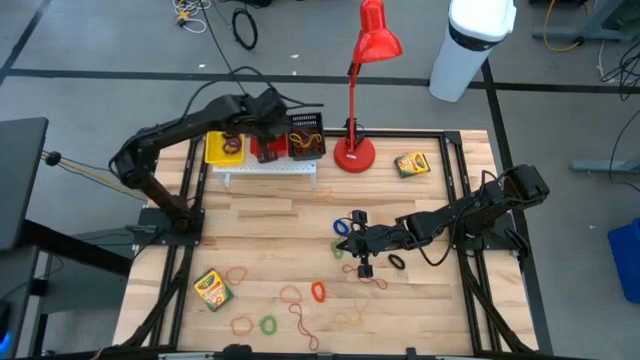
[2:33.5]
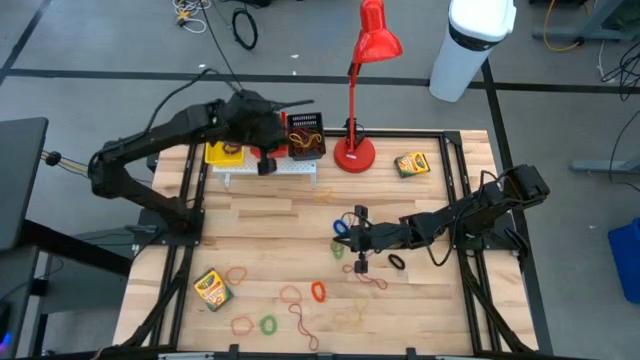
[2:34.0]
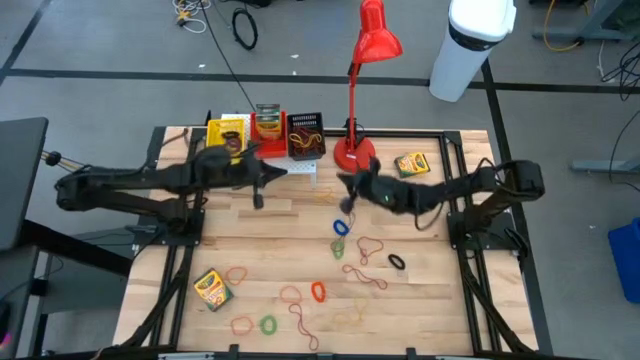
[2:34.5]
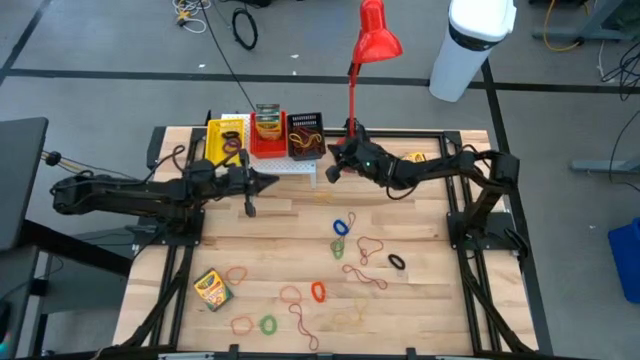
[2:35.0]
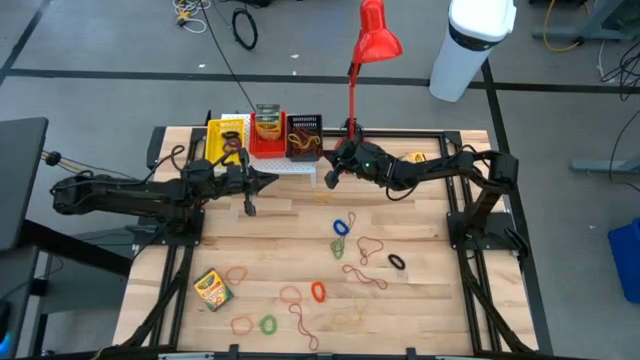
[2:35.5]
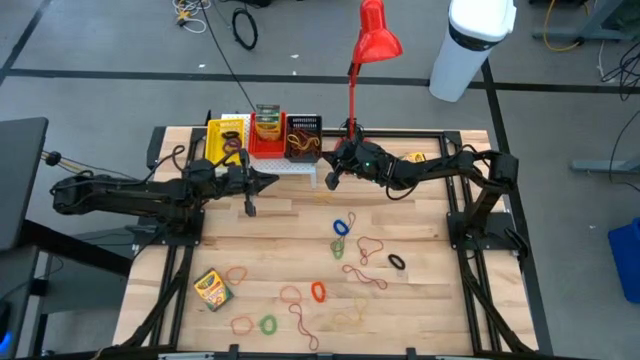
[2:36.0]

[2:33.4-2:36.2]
Task: Pick & Place Office Desk Supplies
Adjust the black bin on the shelf

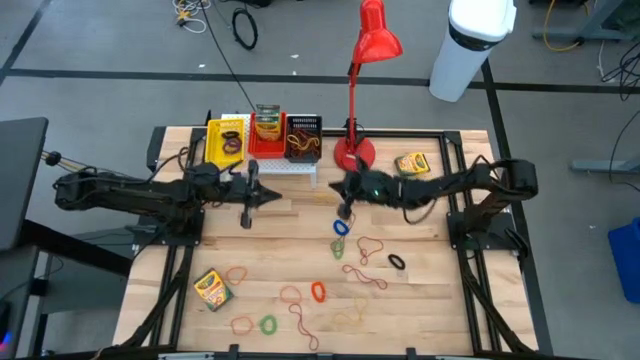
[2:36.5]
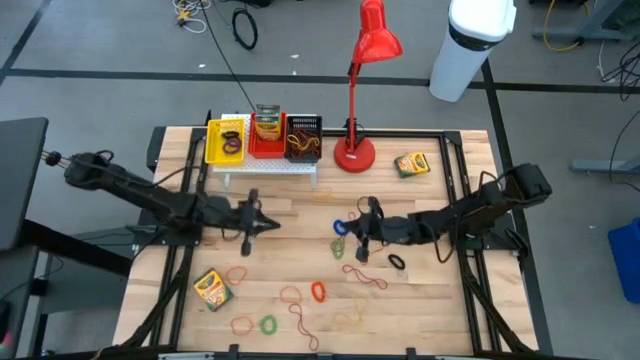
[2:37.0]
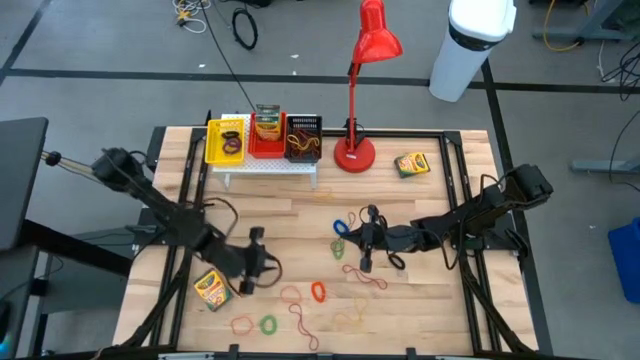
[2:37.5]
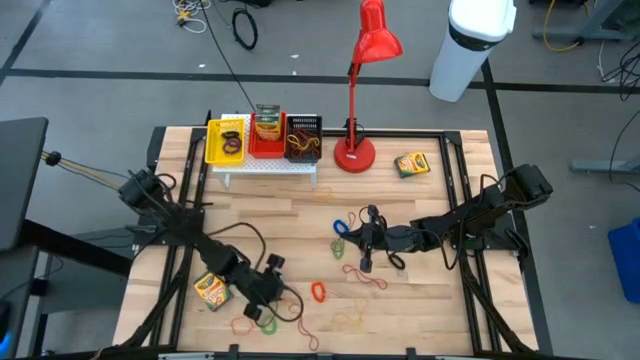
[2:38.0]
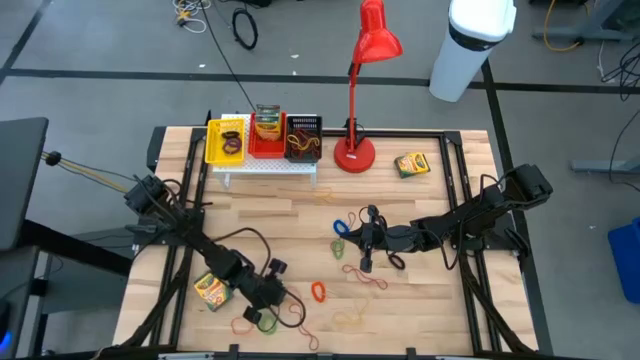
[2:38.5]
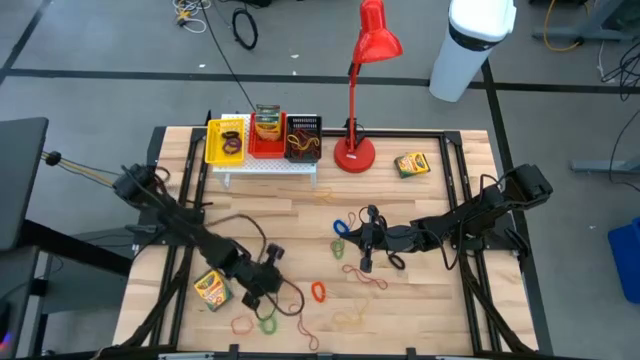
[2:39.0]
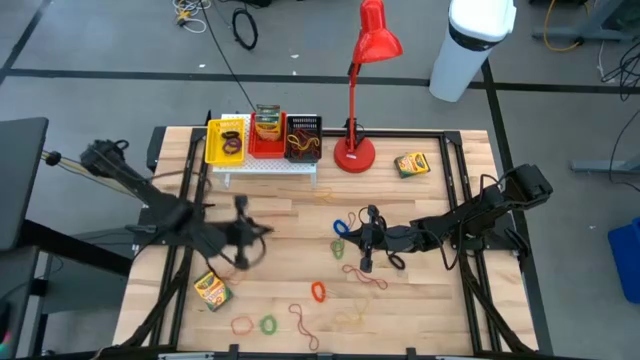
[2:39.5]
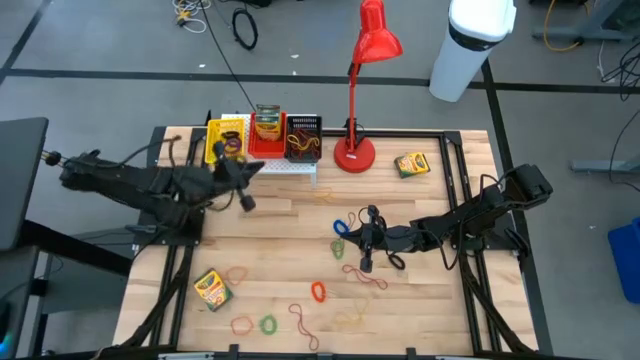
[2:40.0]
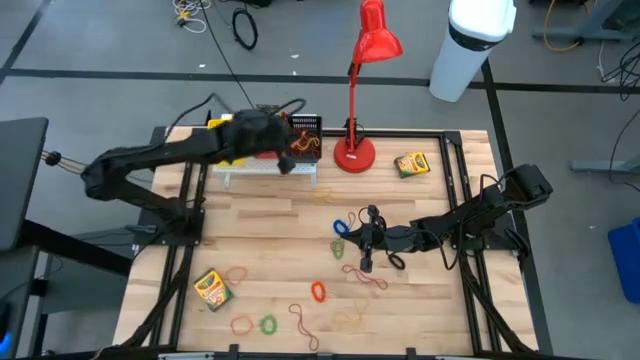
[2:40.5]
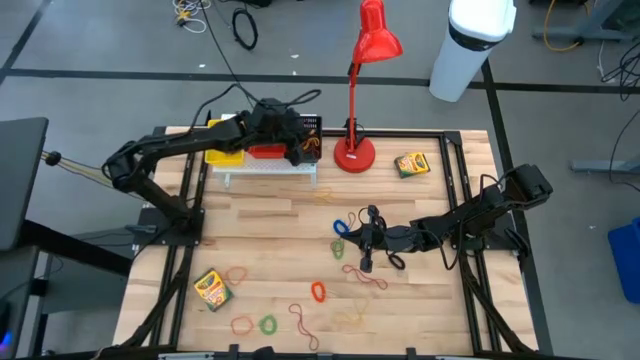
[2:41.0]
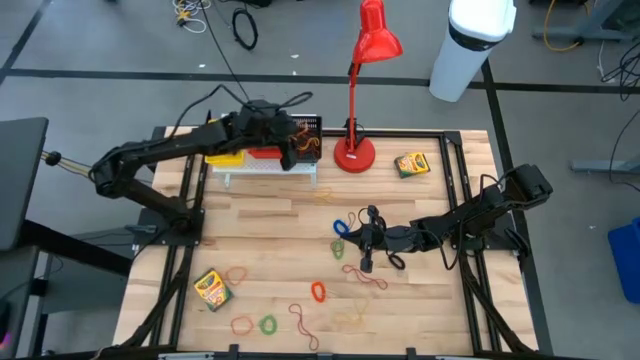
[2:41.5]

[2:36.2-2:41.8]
Put the orange rubber band into the black bin on the shelf

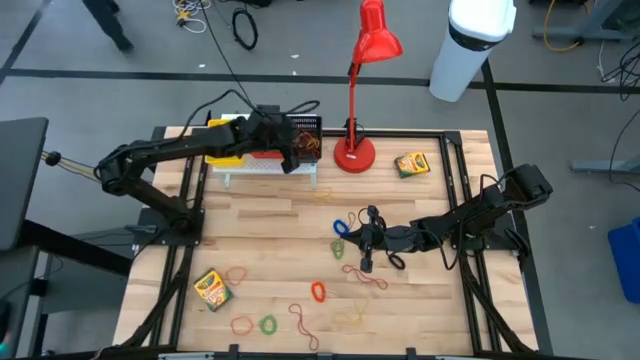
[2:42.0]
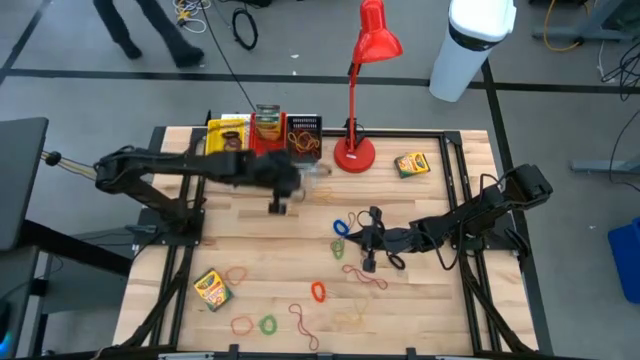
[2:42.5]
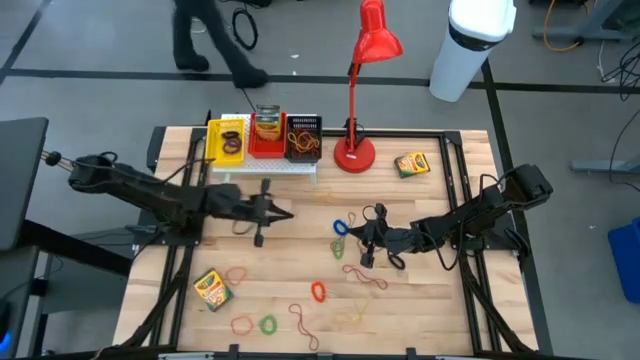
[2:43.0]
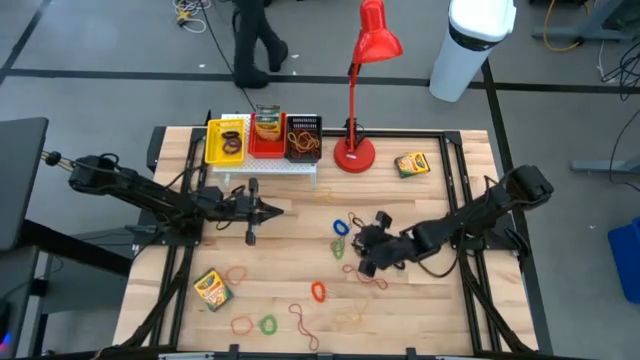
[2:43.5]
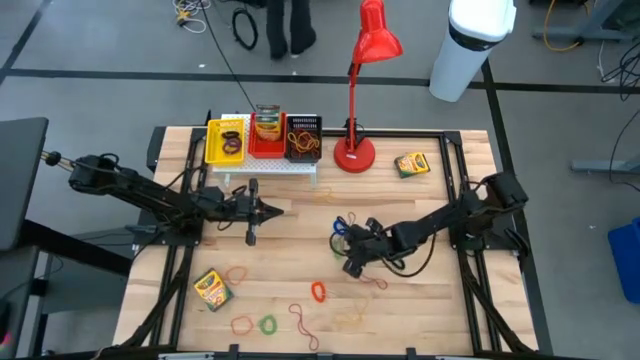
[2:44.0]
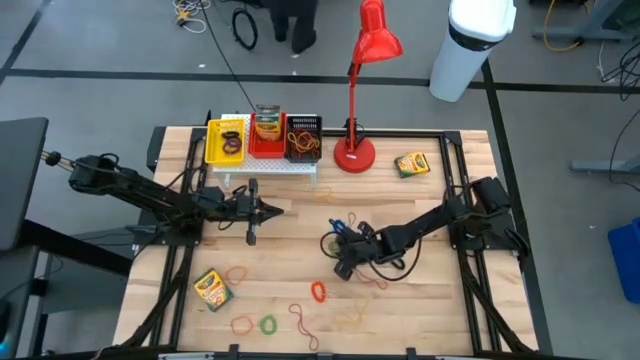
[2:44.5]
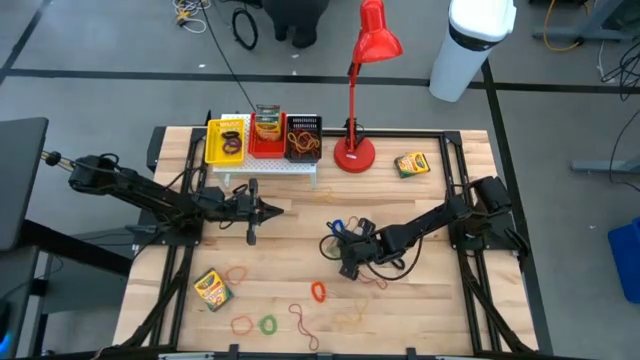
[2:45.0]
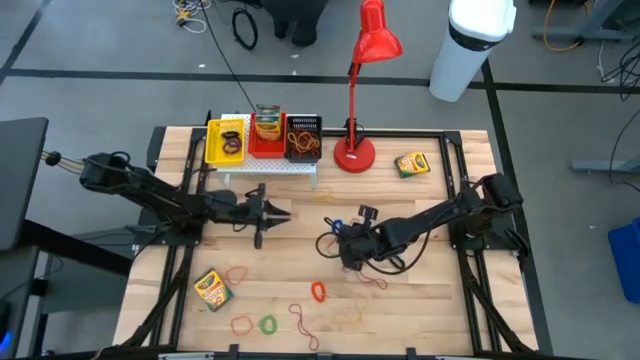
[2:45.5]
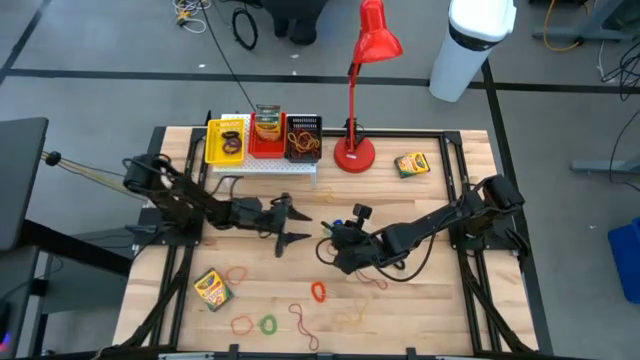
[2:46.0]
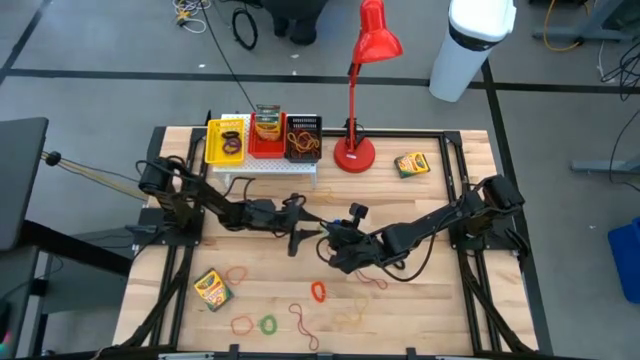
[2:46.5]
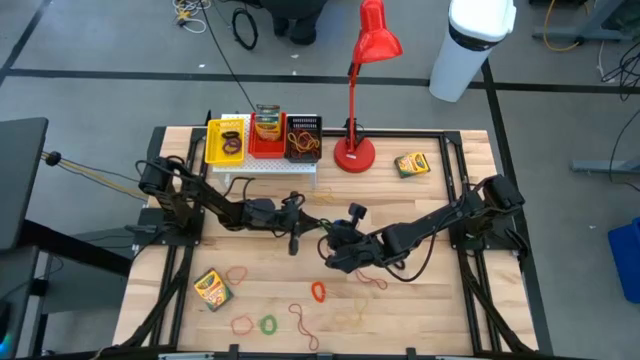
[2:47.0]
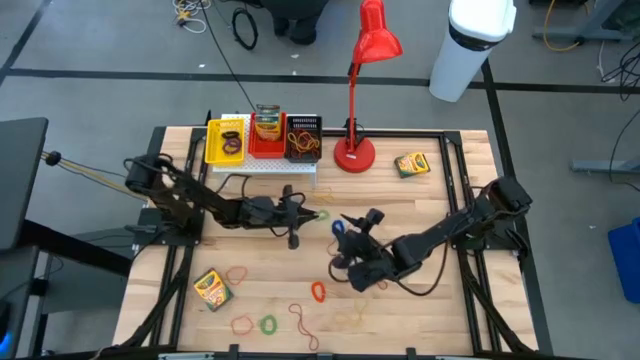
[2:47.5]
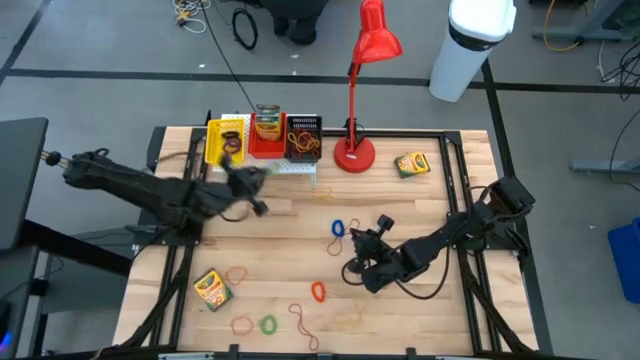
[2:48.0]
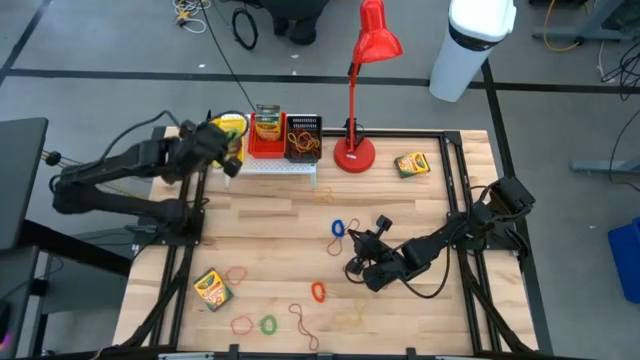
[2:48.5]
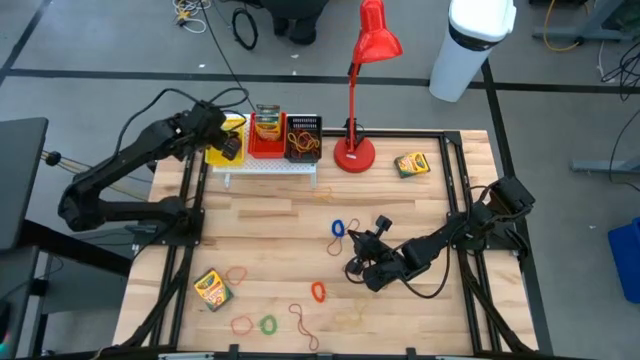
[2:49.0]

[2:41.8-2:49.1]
Put the green spring rubber band into the yellow bin on the shelf

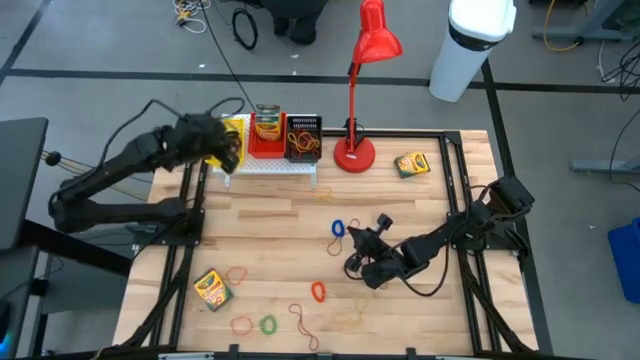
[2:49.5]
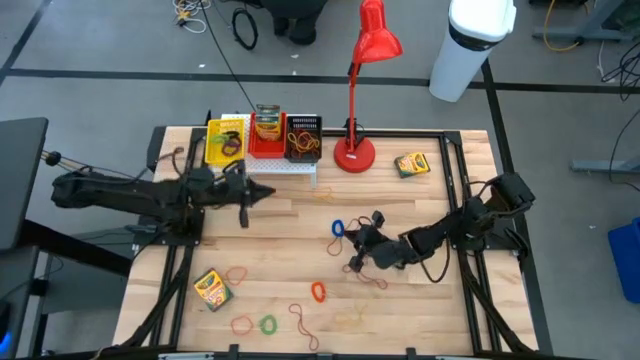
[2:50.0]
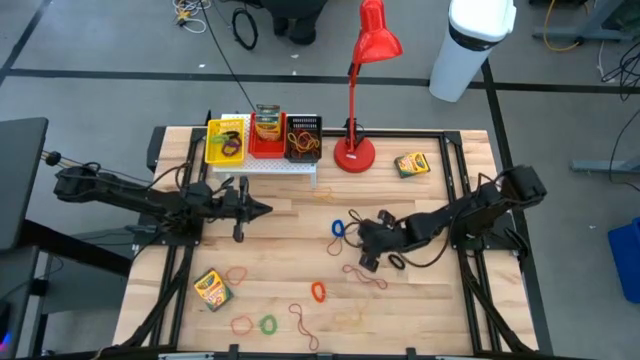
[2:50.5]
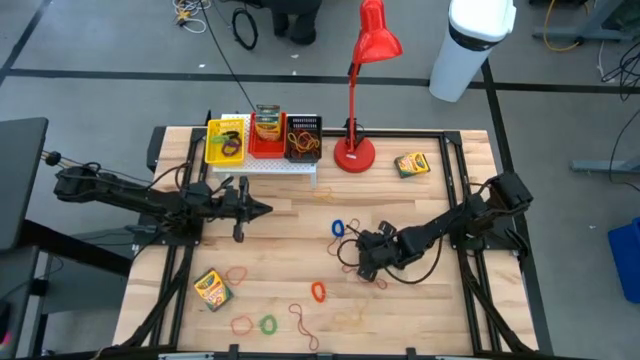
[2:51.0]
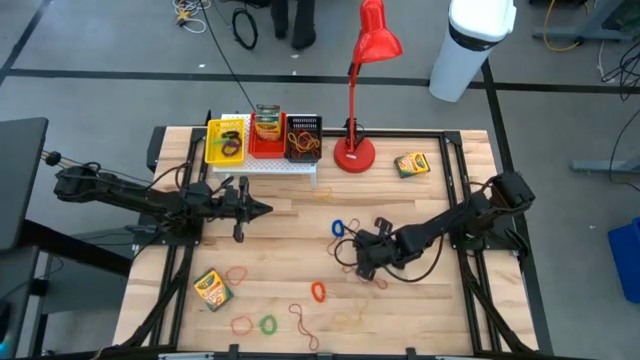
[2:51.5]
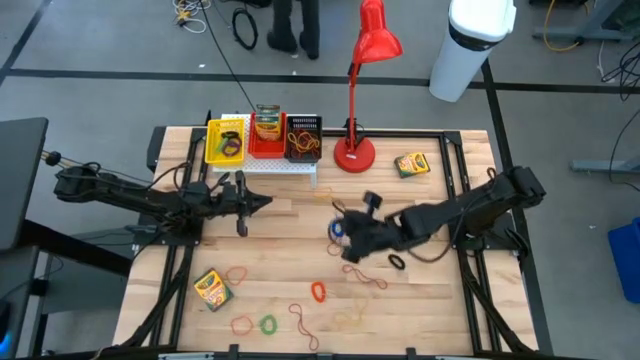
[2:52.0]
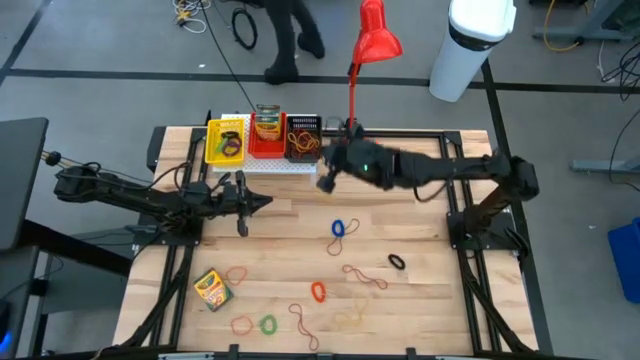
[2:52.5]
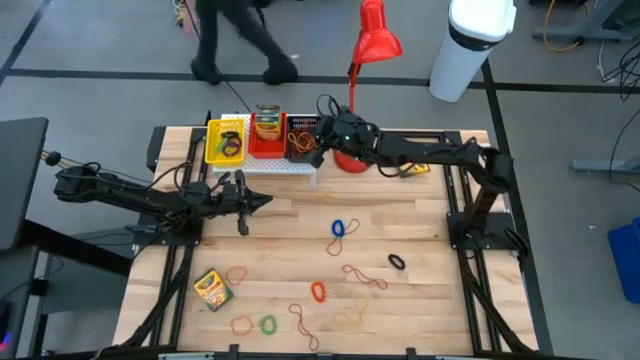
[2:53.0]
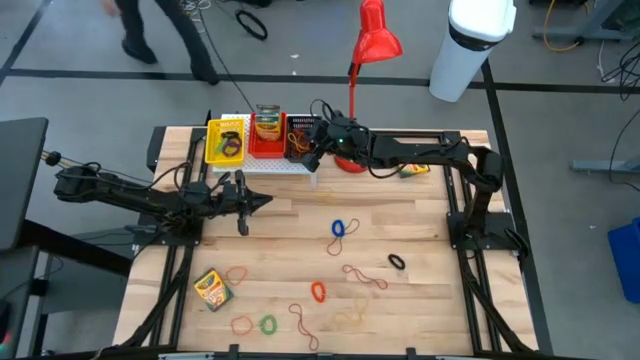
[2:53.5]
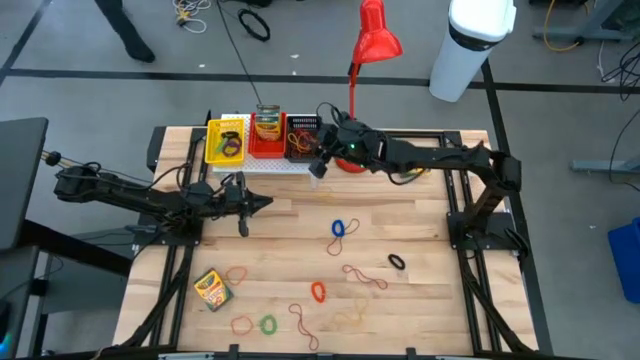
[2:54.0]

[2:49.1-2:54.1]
Put the red rubber band into the black bin on the shelf
